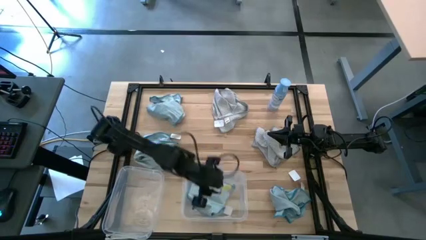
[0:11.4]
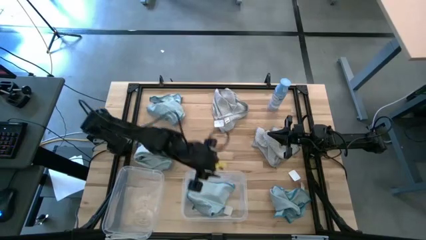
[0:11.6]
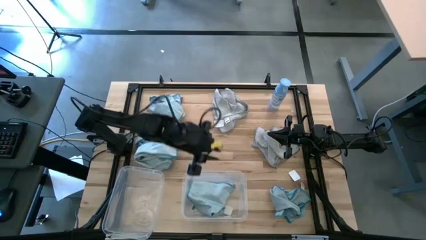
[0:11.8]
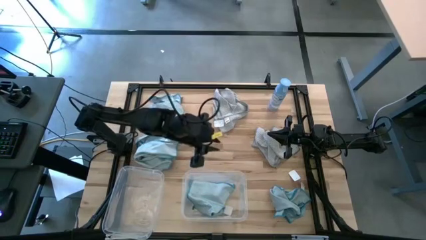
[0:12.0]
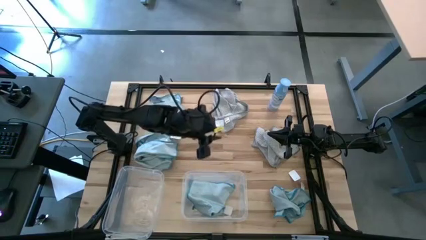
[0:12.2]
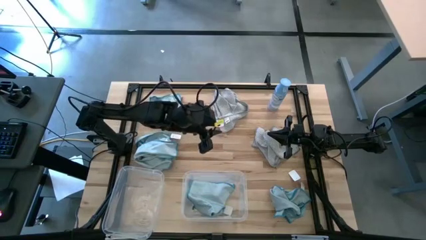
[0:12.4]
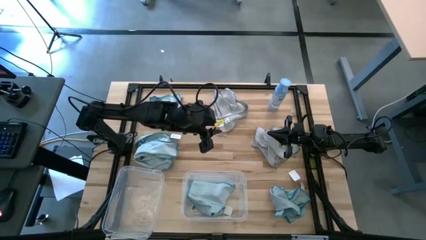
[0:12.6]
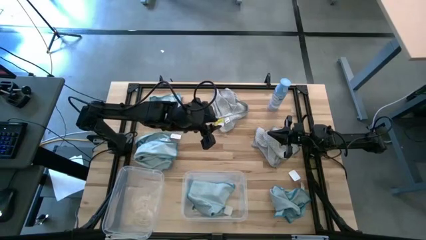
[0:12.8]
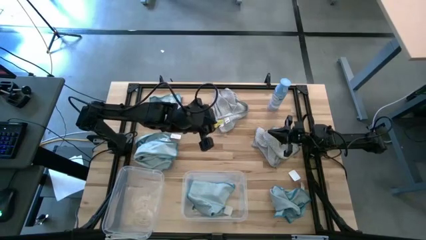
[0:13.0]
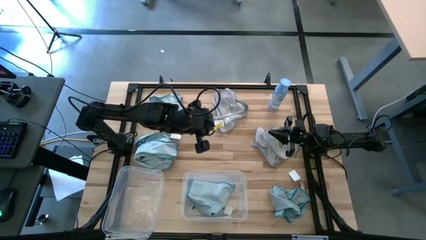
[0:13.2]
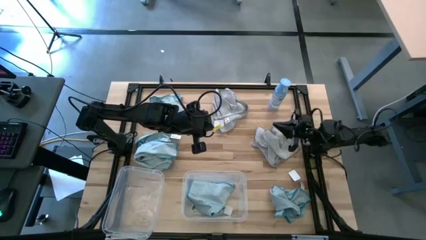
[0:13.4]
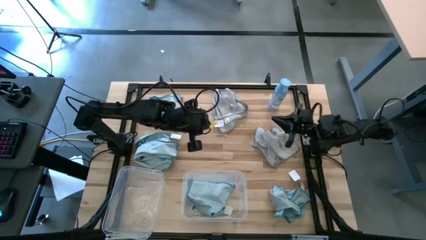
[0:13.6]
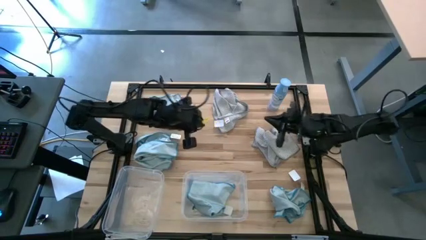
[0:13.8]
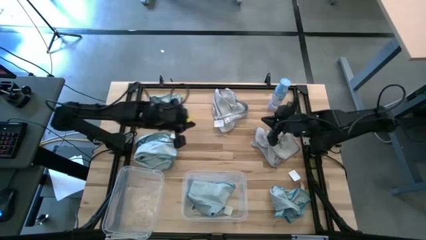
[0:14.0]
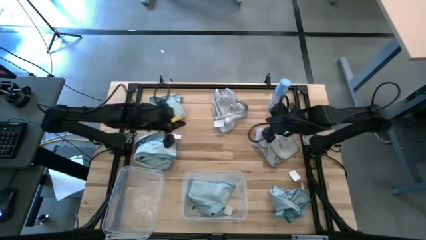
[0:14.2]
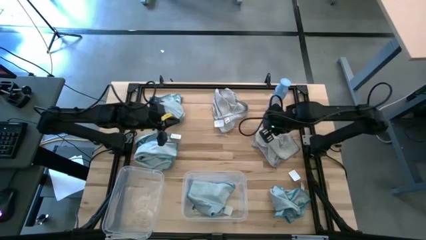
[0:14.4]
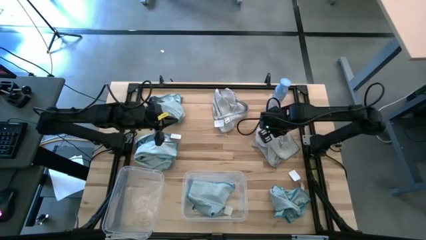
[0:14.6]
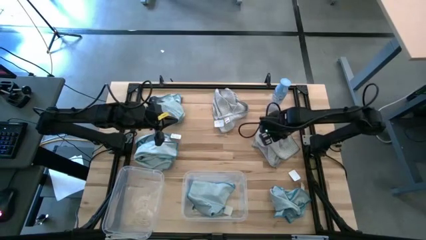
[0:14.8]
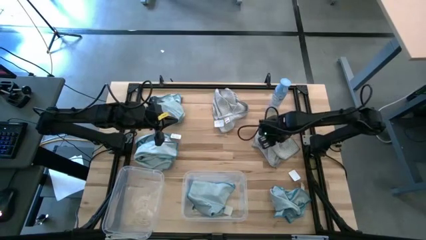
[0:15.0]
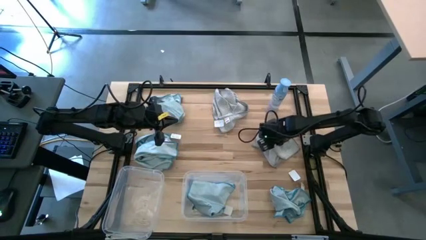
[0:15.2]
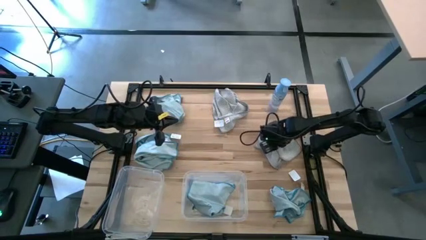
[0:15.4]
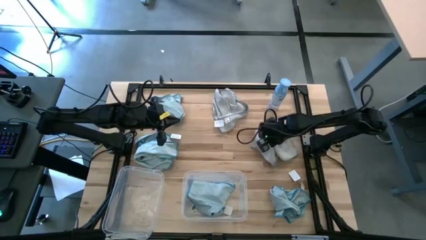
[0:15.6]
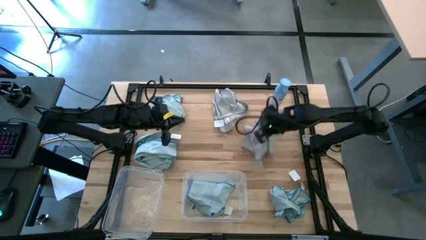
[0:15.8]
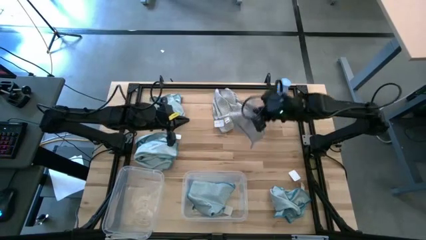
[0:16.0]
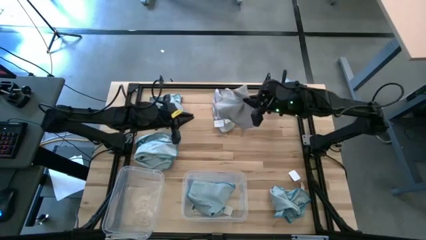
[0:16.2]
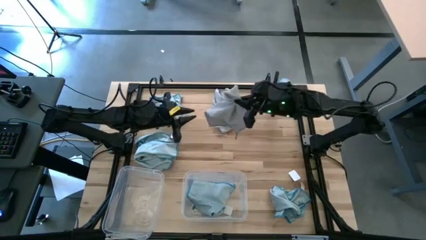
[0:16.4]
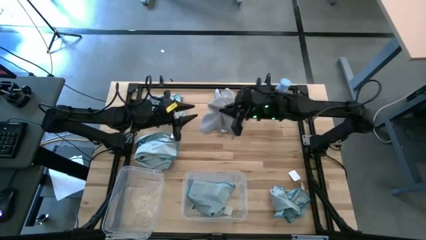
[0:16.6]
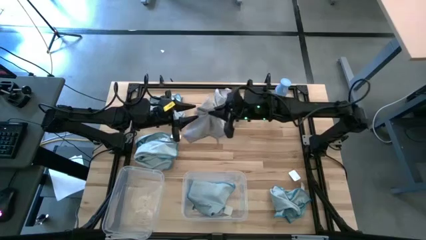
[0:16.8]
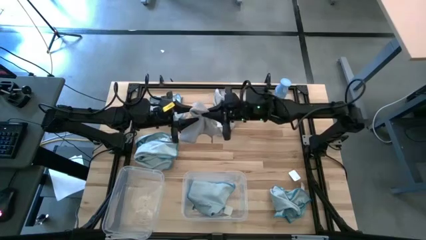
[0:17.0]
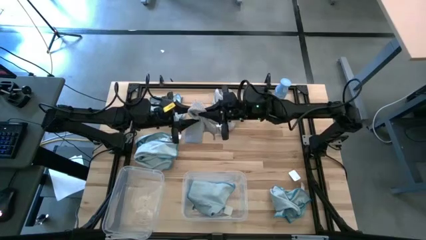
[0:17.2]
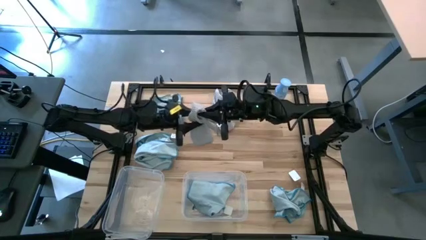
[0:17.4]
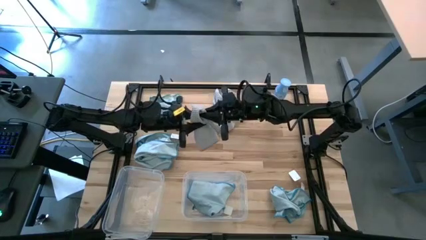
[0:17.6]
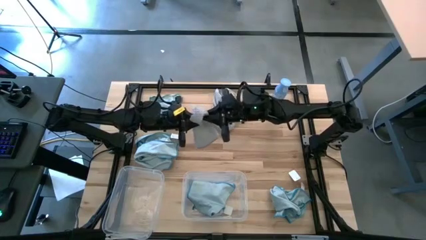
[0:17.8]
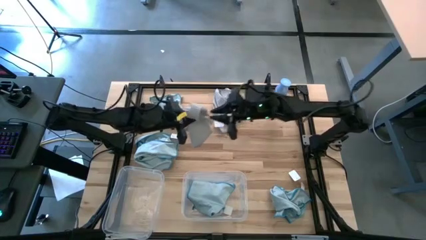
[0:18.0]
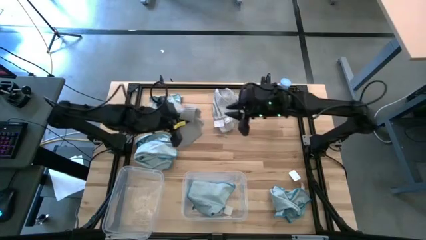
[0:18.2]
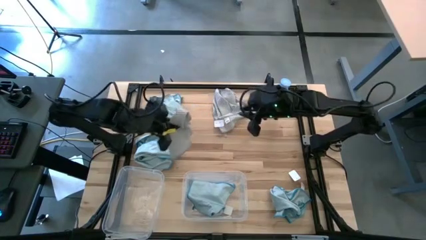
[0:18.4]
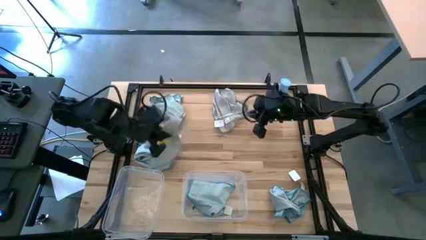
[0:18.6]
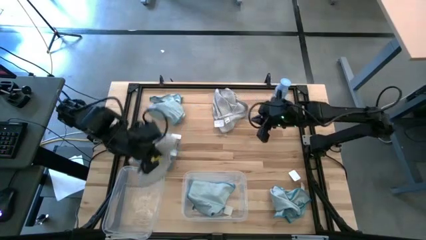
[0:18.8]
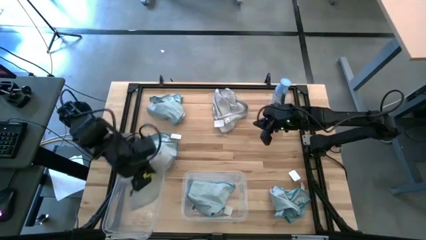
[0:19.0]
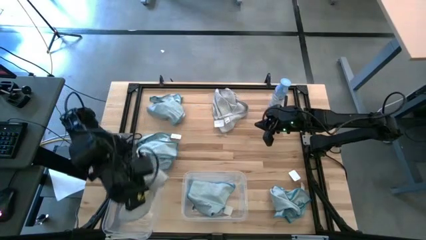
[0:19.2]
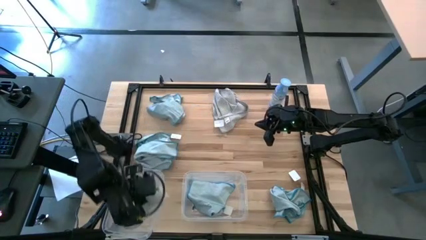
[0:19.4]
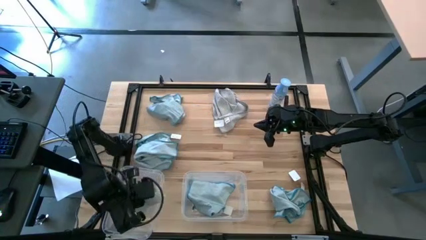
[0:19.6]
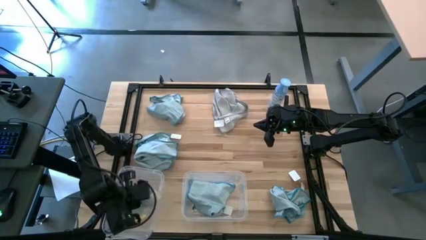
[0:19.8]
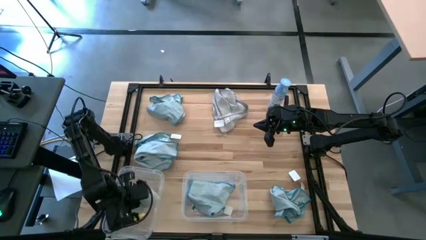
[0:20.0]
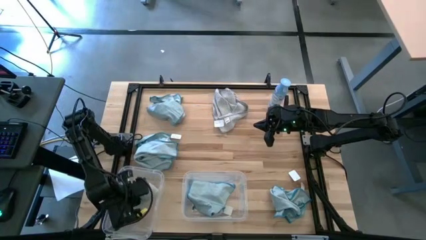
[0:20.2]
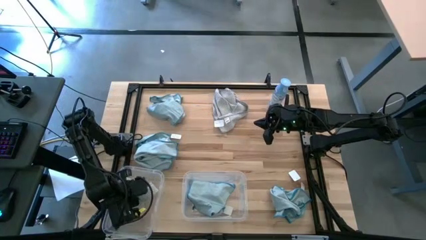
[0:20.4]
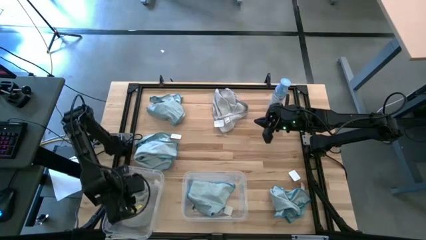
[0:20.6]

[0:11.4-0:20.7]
Task: Sort microfiber towel by color & place in baskets
Put the middle right grey towel into the left transparent bin

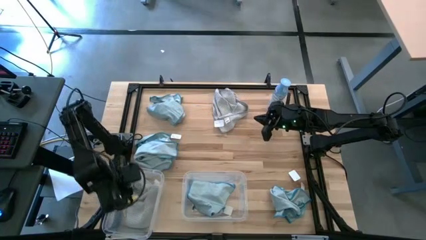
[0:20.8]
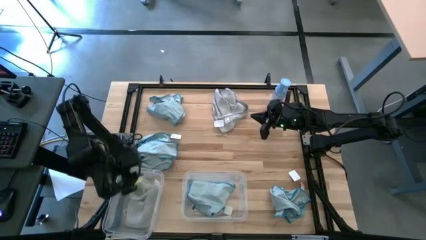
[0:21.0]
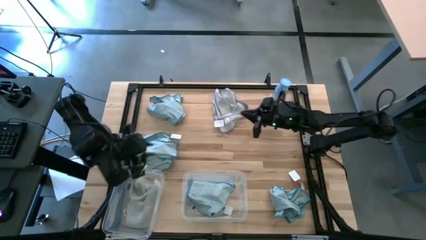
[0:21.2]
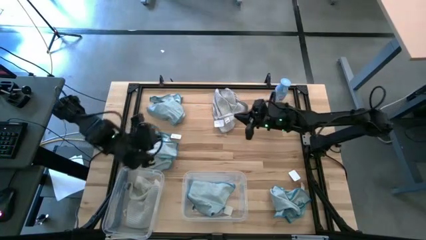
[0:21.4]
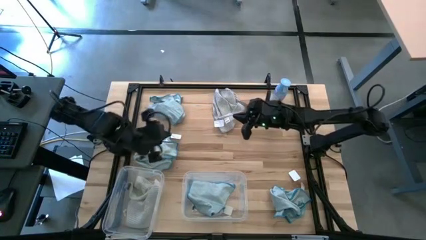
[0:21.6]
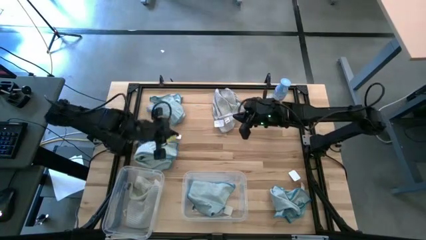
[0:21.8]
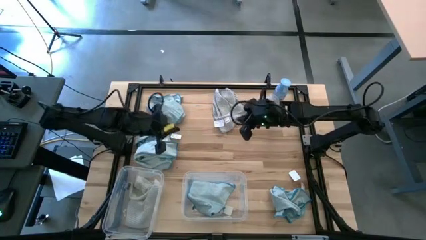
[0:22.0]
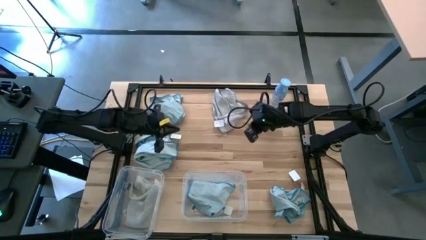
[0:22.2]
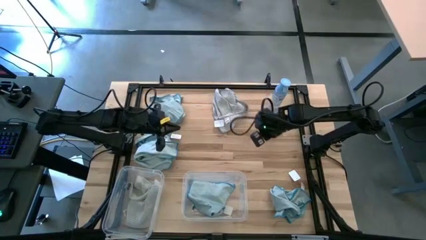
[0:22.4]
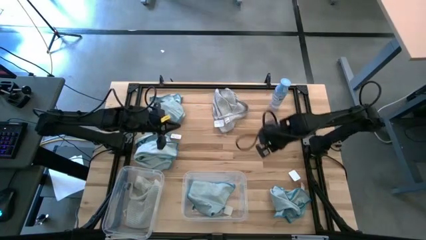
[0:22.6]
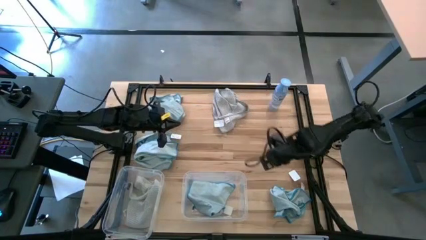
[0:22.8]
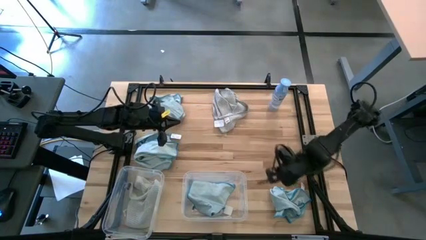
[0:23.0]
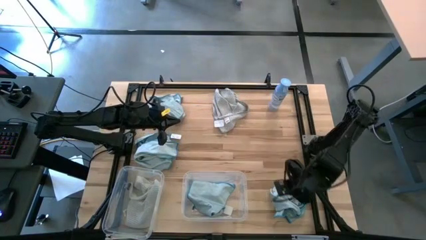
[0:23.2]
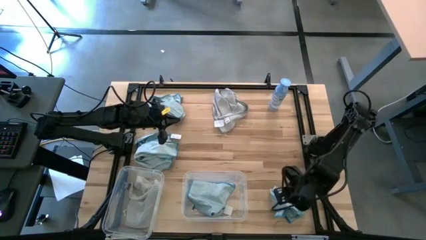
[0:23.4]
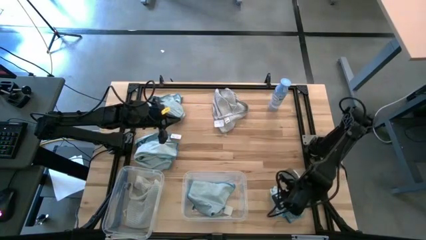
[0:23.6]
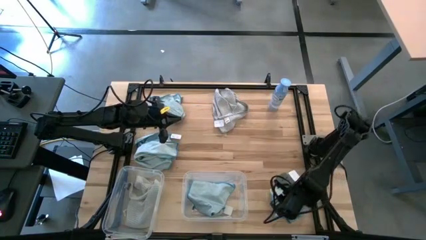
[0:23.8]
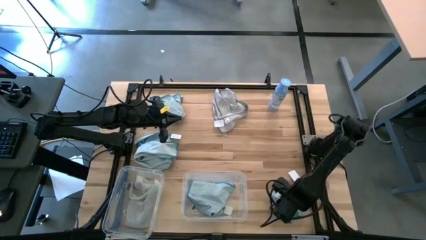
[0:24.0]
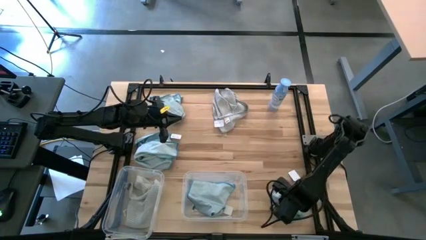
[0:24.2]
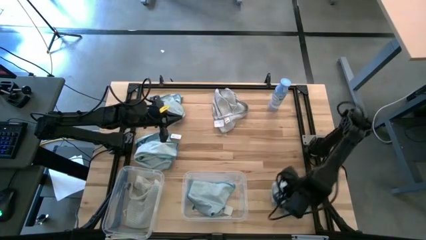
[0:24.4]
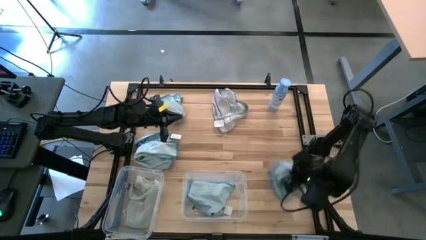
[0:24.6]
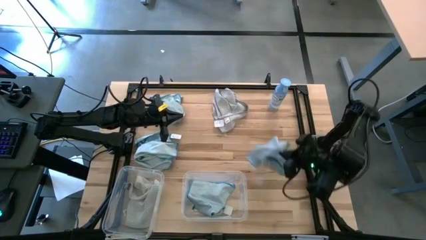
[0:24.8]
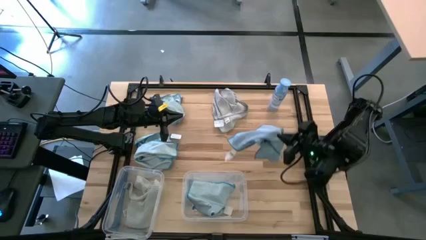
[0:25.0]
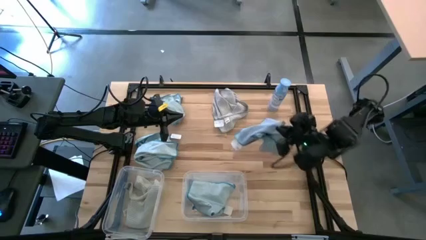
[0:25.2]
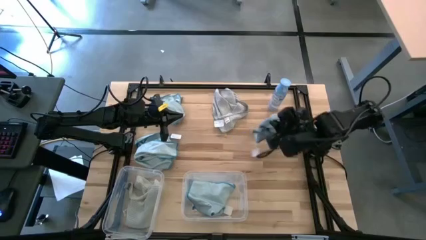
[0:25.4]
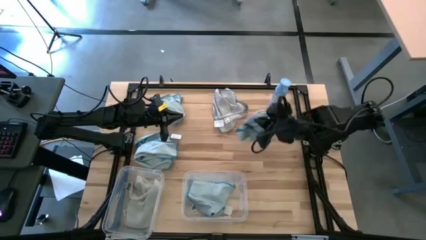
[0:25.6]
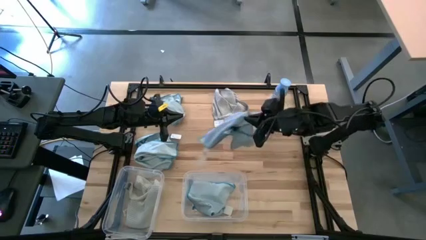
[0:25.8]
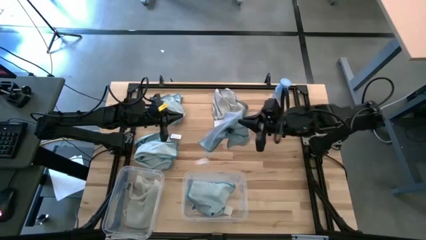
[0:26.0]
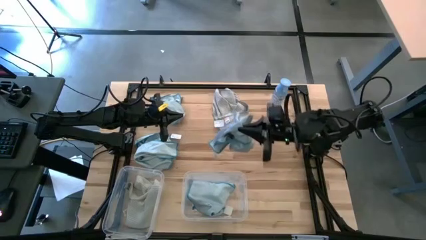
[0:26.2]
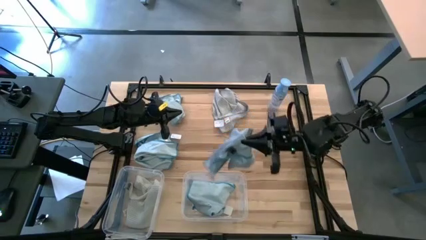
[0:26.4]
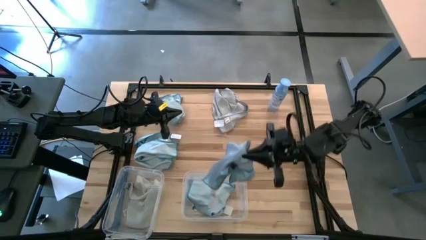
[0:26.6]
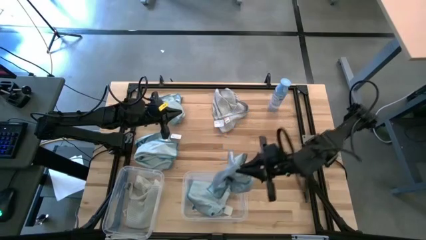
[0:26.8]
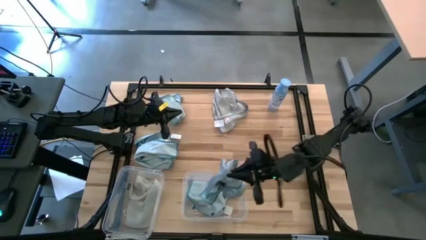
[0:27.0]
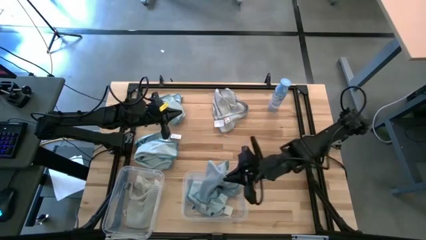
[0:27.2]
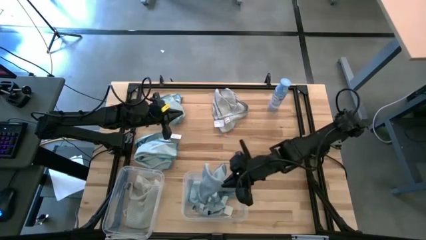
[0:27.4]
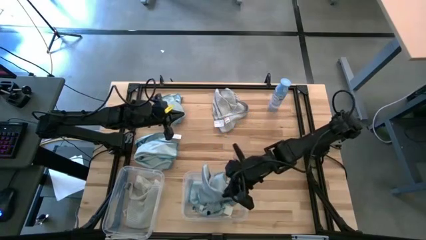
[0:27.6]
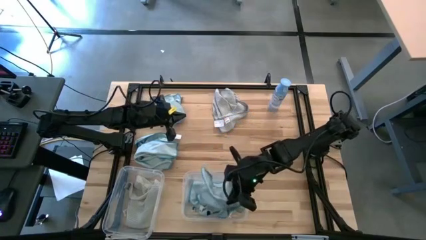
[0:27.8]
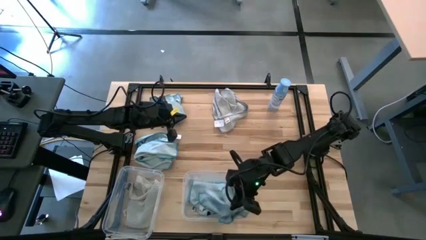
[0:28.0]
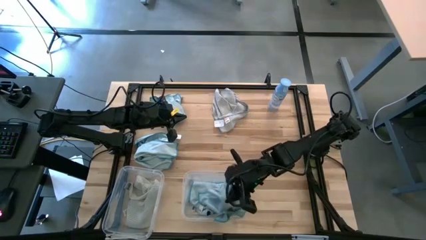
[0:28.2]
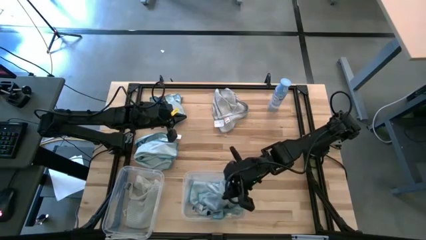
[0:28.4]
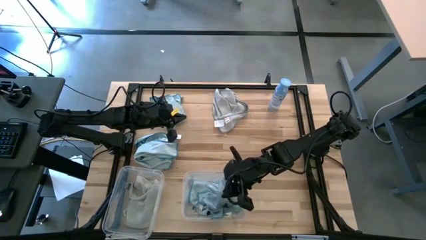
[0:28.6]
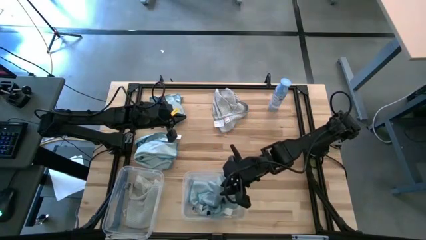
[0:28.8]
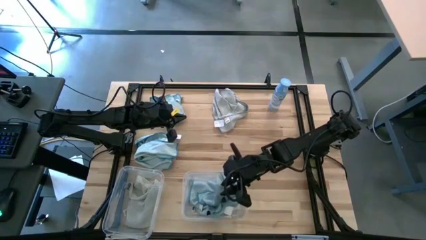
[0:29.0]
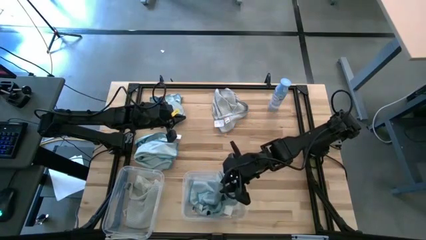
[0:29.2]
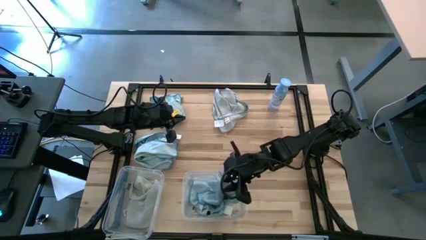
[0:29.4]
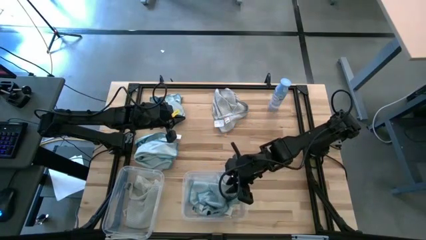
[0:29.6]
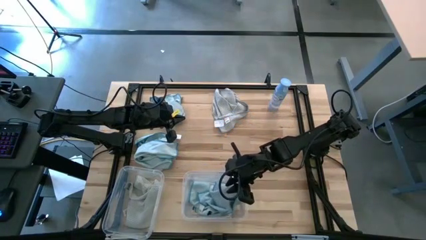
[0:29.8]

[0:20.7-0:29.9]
Put the bottom right blue towel into the right transparent bin
